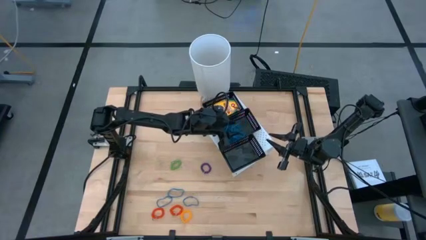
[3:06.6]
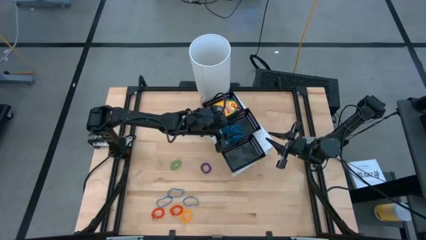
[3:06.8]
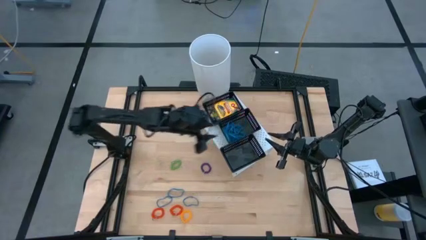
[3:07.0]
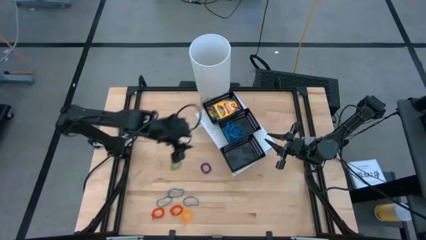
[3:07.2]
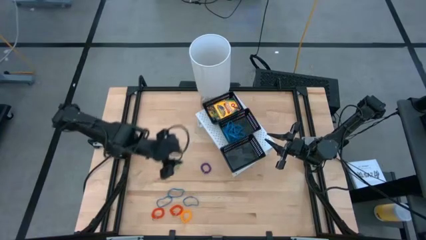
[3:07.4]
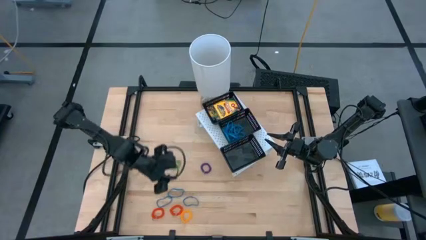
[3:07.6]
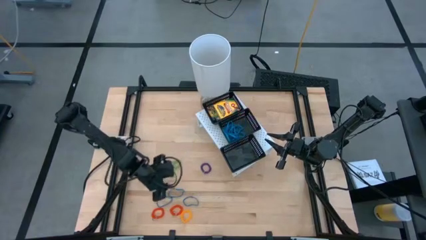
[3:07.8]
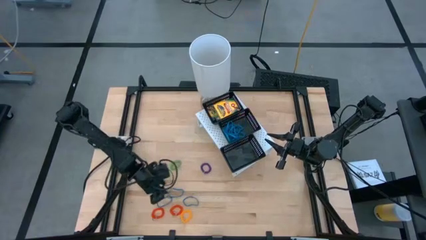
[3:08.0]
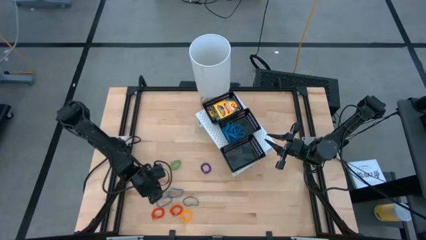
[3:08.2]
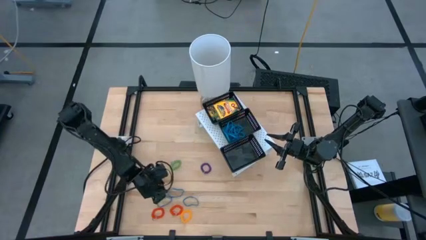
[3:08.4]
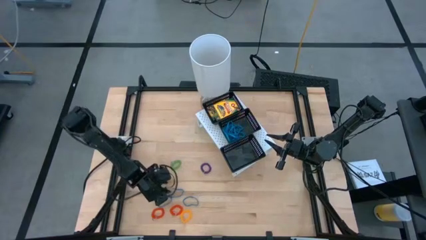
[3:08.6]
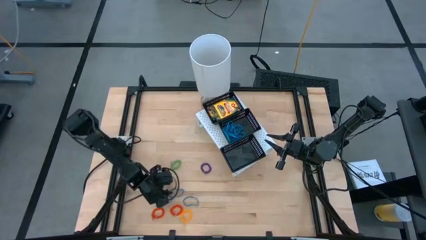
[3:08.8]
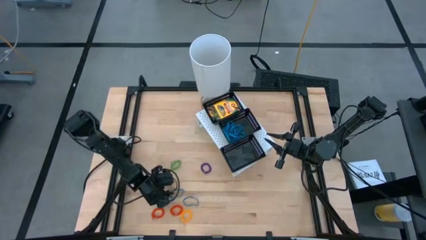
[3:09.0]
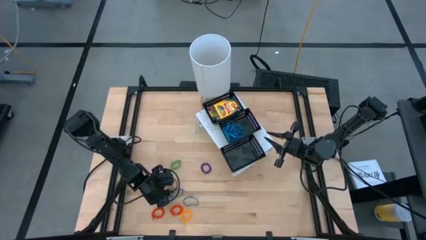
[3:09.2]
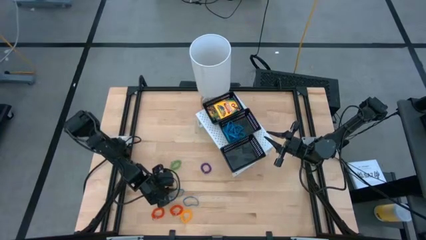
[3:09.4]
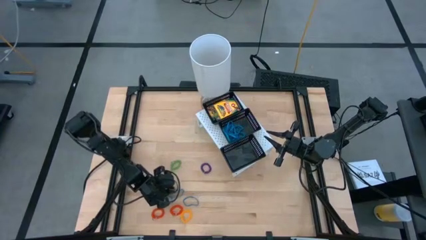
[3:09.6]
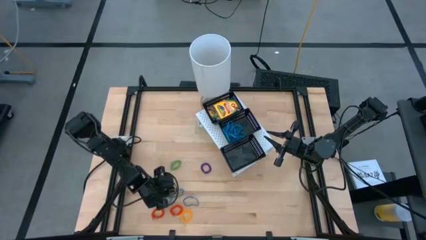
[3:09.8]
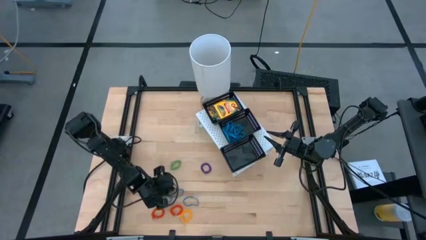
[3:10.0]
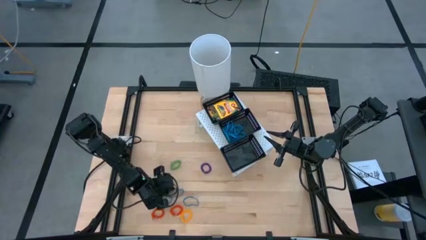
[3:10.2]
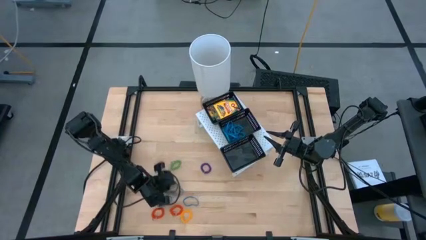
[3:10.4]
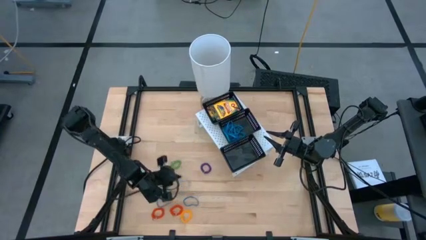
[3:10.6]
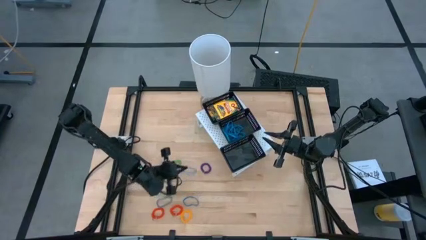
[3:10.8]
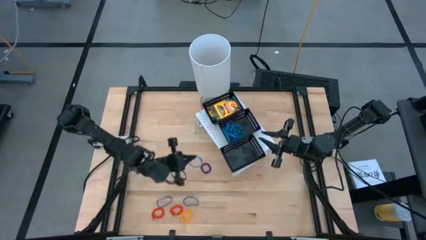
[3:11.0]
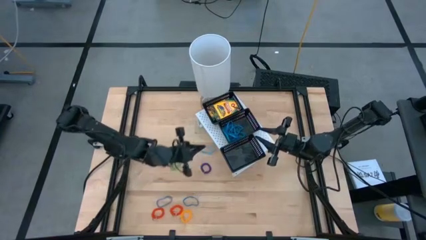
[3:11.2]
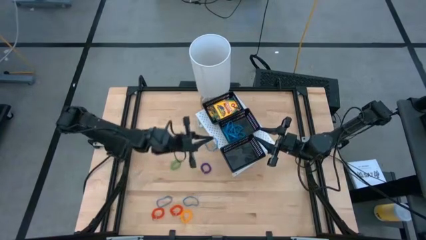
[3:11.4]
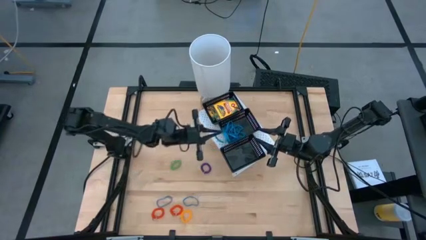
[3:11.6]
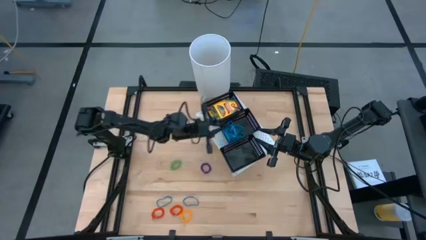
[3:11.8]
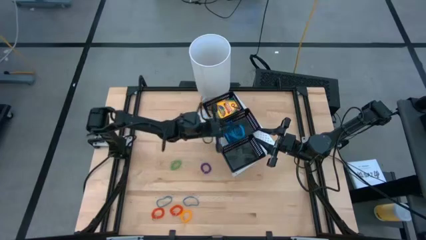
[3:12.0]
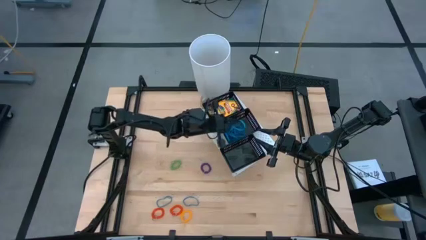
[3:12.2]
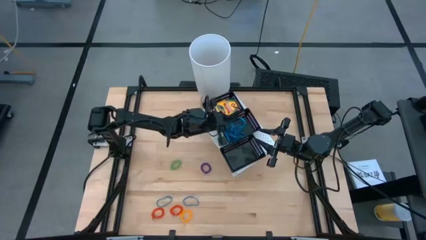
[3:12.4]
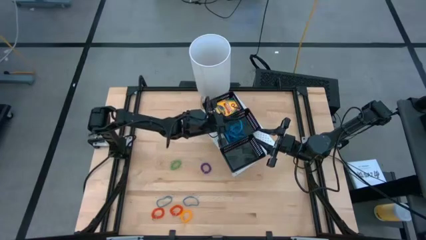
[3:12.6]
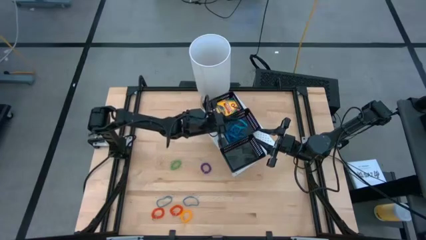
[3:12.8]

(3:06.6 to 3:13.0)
Task: Pick & Place Office Desk Supplies
Put the blue rubber band into the middle black bin on the shelf

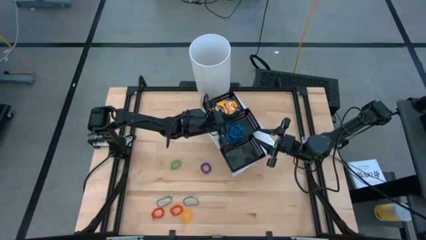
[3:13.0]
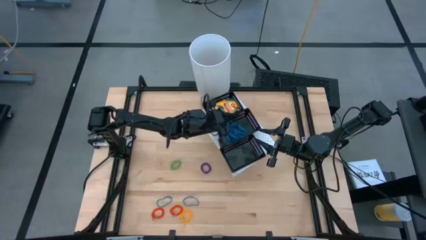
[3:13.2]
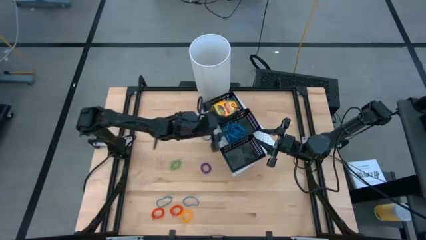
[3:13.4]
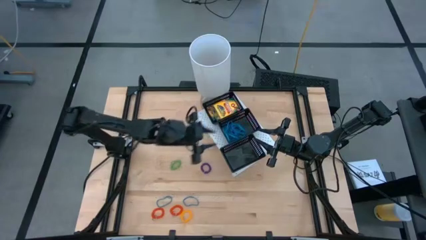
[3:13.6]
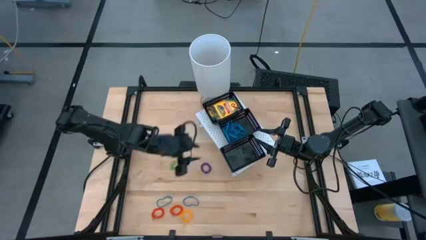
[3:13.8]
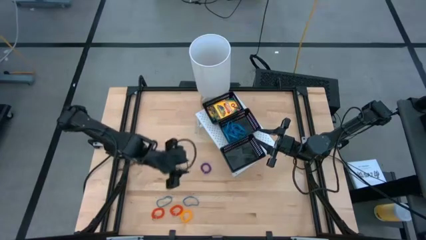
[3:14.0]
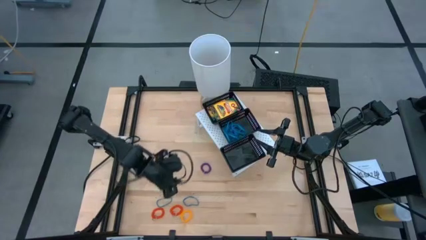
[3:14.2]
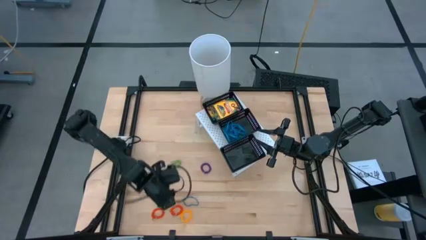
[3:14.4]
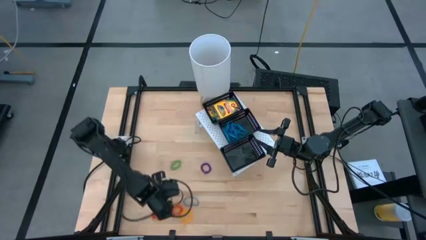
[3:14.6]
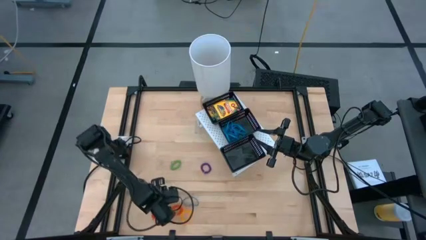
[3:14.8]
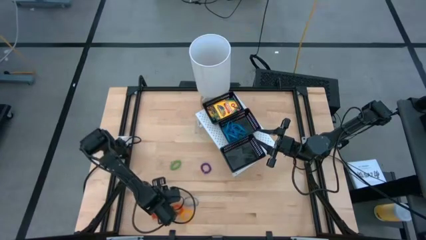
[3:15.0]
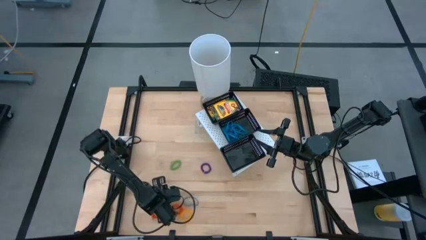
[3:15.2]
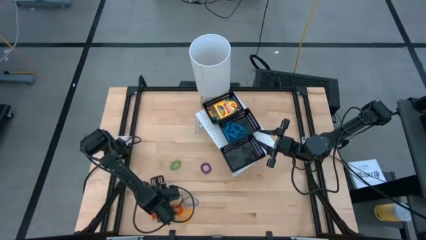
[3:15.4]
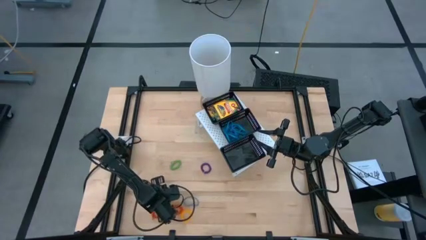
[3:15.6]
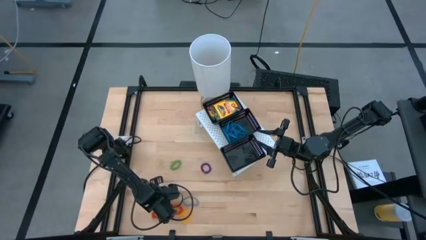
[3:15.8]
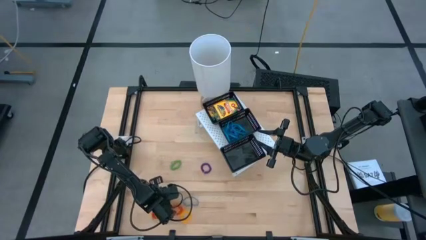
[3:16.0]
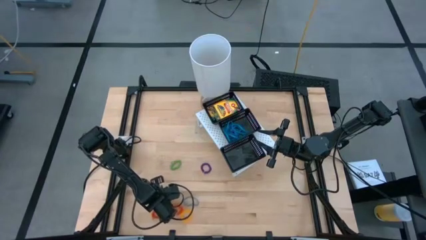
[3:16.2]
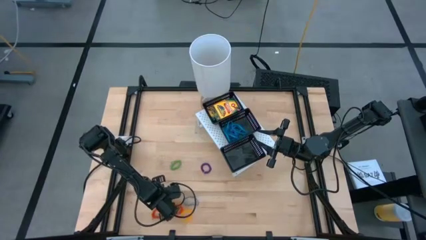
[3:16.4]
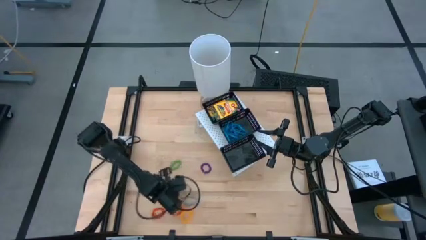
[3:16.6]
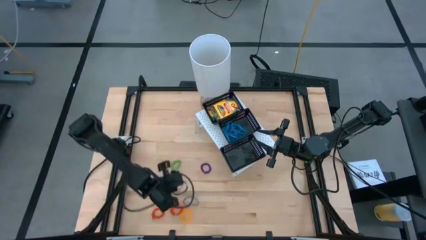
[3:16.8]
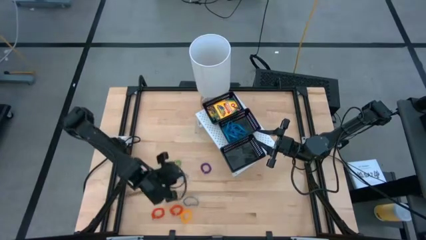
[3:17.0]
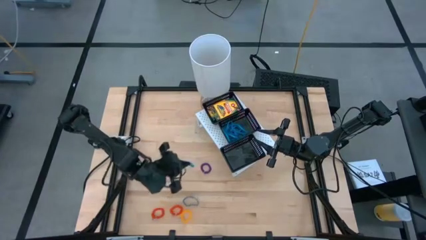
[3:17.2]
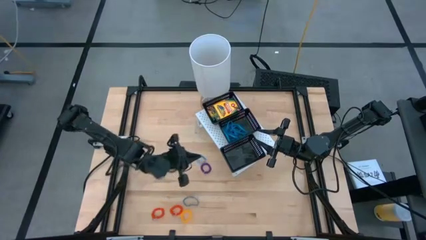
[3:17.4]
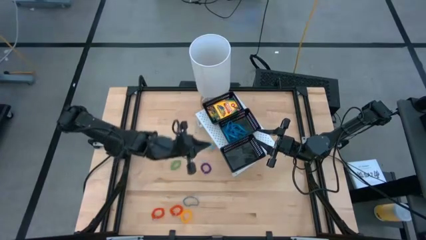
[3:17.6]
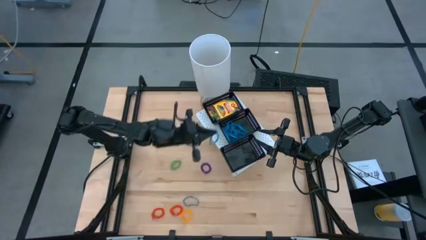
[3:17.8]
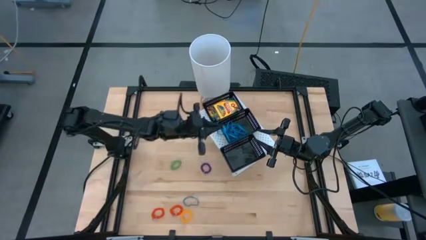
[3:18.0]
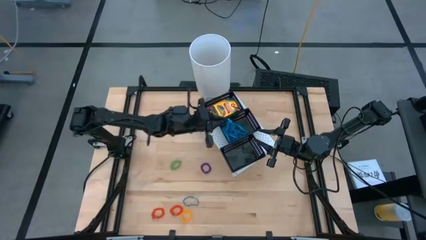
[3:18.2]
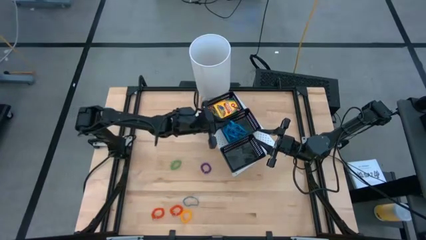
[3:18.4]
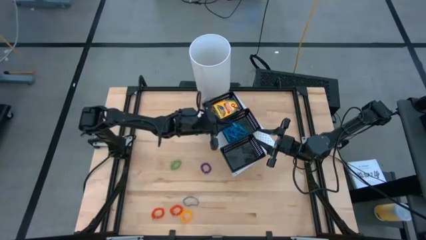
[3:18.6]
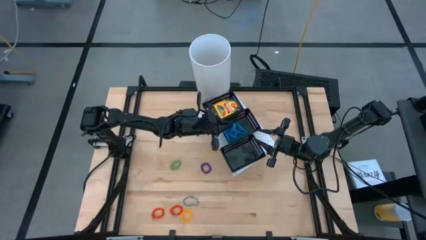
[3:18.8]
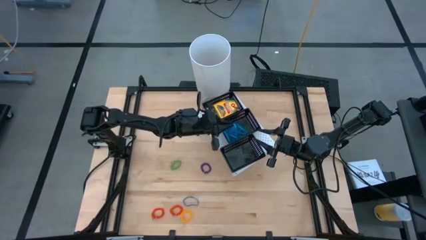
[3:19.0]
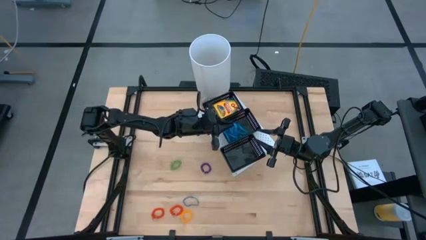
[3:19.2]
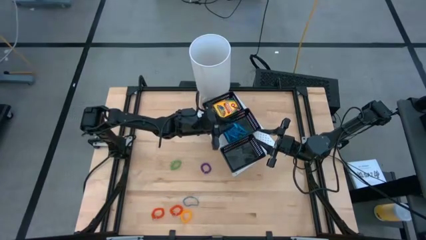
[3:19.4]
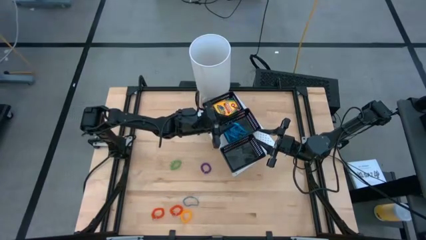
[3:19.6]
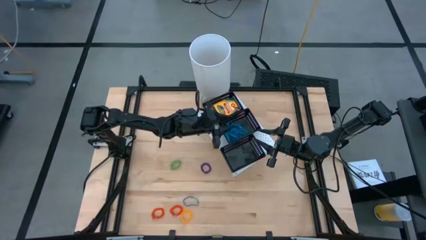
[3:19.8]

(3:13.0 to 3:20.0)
Put the blue rubber band into the middle black bin on the shelf
